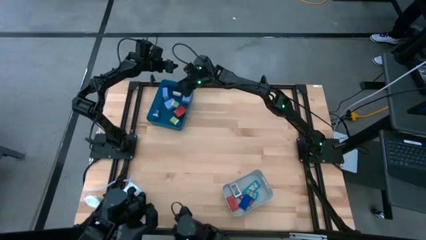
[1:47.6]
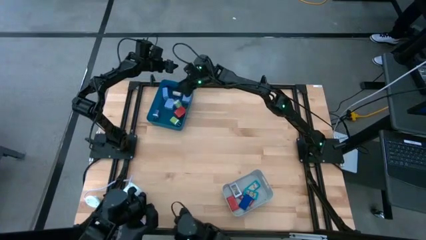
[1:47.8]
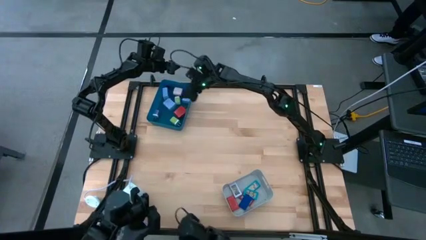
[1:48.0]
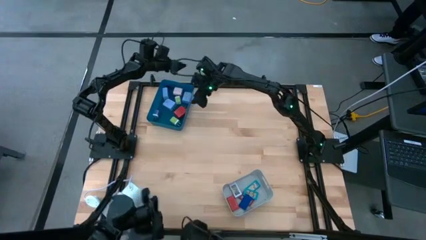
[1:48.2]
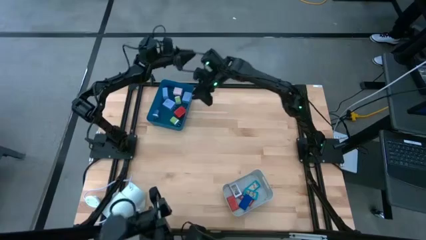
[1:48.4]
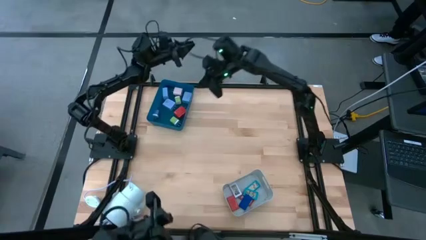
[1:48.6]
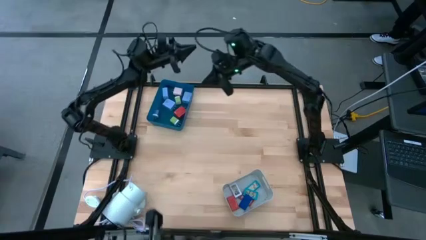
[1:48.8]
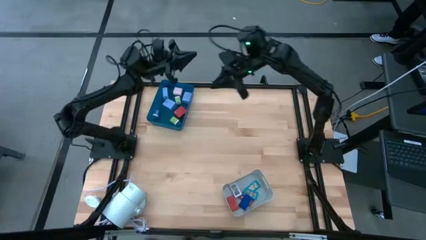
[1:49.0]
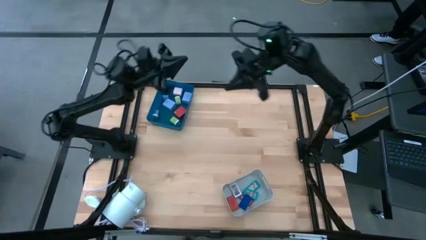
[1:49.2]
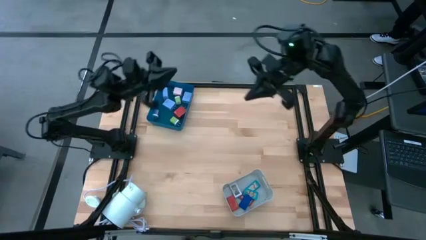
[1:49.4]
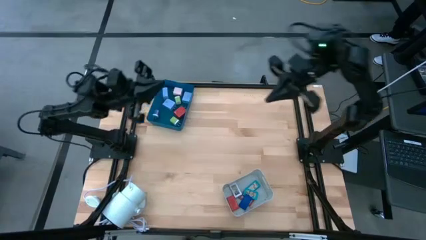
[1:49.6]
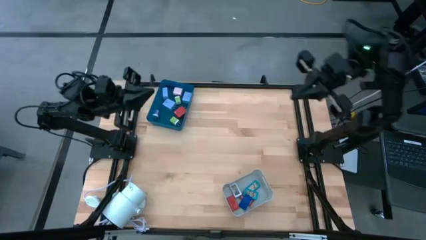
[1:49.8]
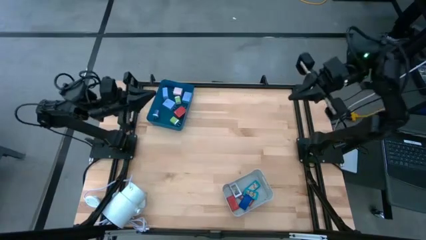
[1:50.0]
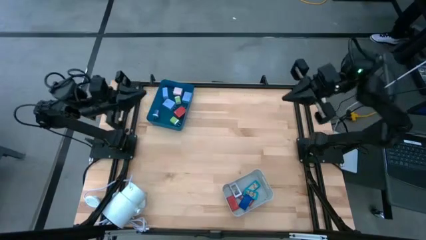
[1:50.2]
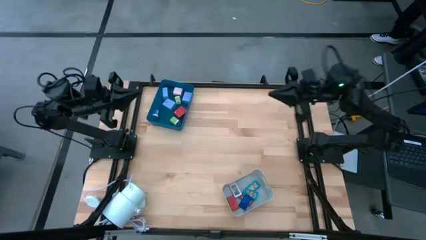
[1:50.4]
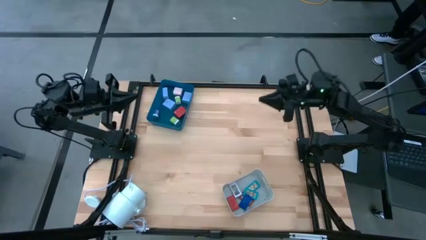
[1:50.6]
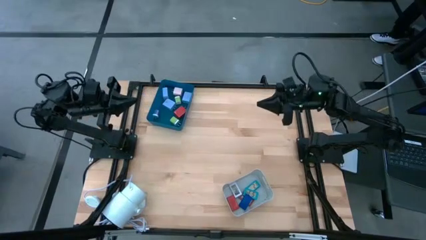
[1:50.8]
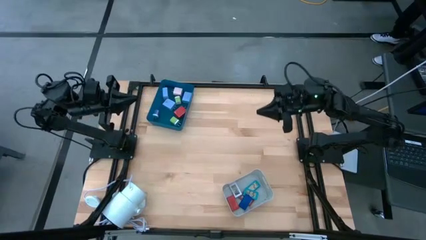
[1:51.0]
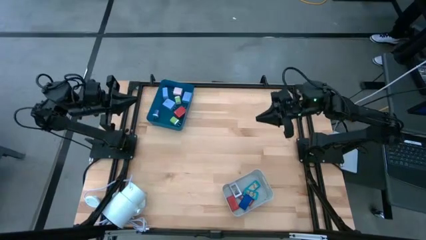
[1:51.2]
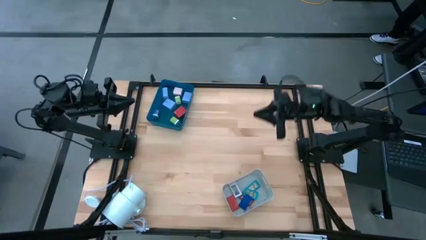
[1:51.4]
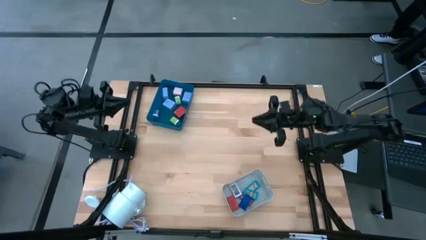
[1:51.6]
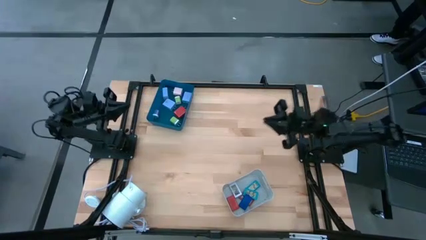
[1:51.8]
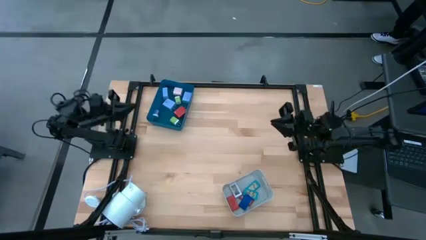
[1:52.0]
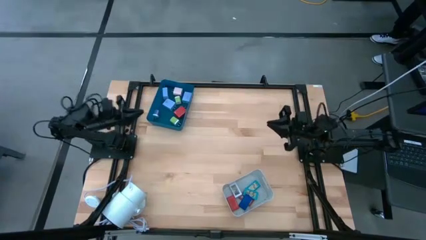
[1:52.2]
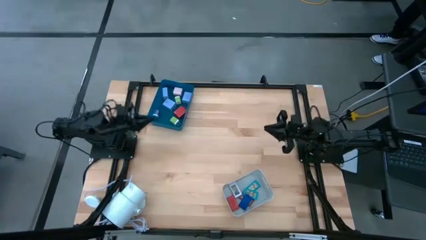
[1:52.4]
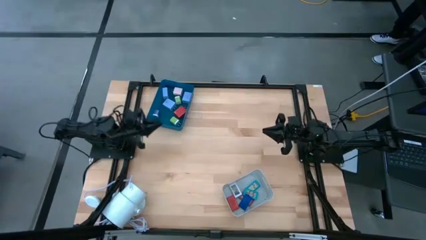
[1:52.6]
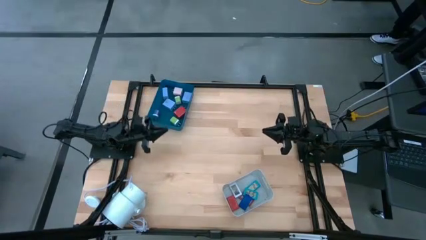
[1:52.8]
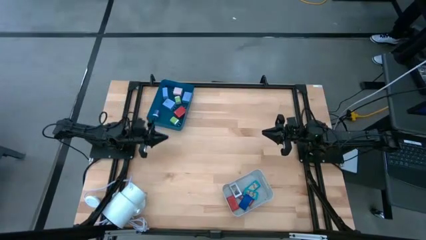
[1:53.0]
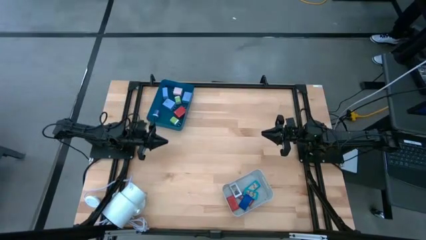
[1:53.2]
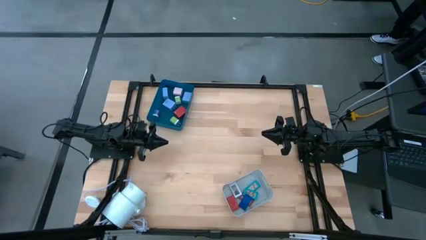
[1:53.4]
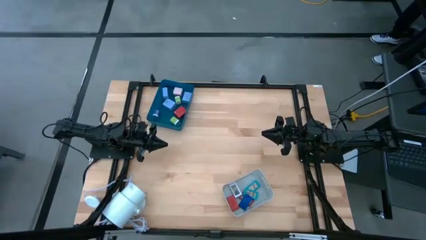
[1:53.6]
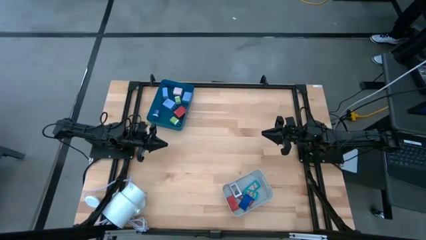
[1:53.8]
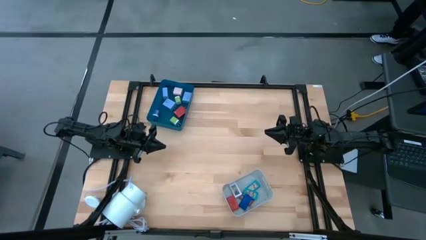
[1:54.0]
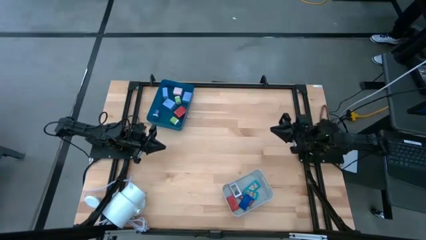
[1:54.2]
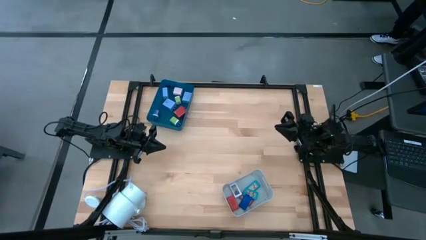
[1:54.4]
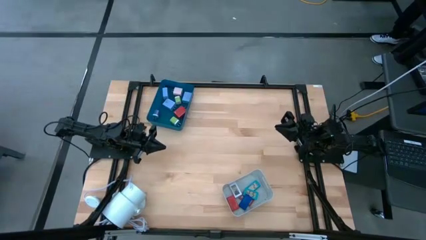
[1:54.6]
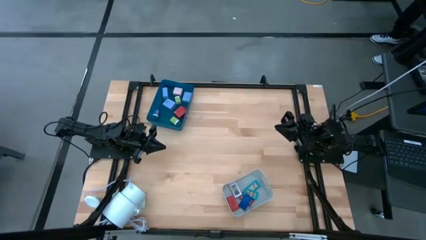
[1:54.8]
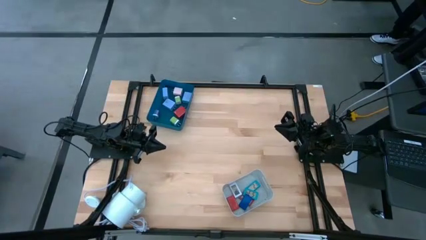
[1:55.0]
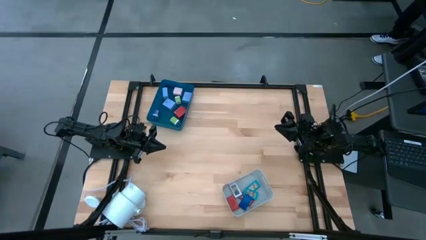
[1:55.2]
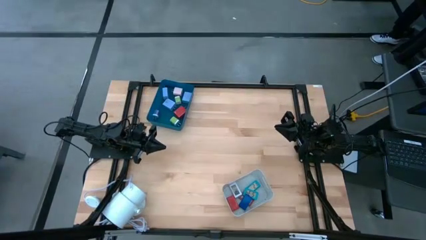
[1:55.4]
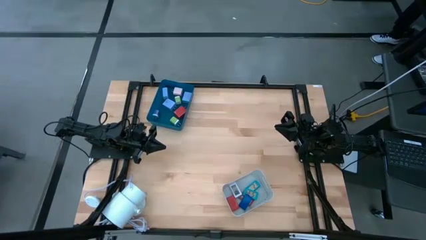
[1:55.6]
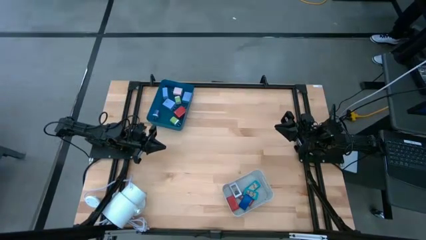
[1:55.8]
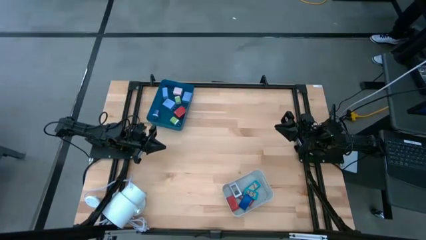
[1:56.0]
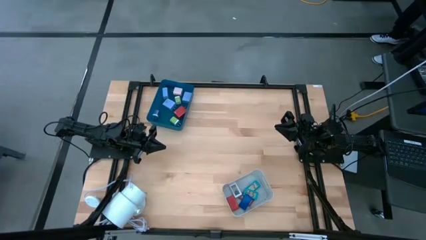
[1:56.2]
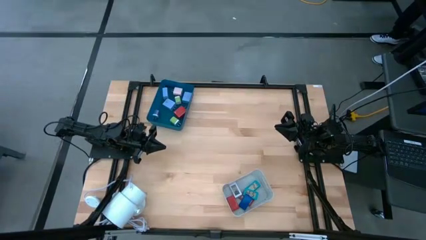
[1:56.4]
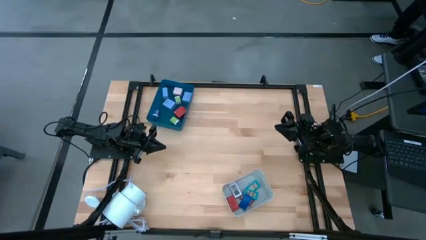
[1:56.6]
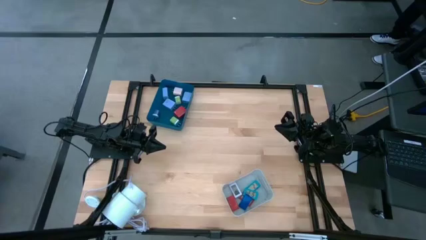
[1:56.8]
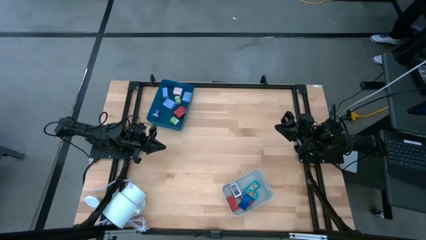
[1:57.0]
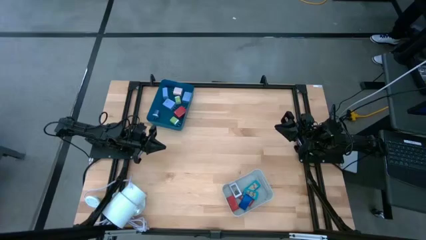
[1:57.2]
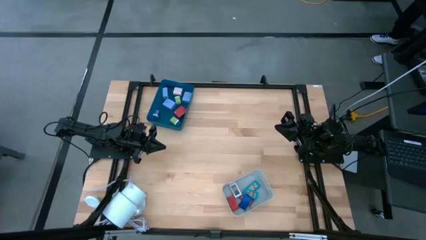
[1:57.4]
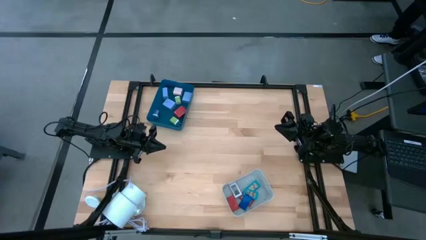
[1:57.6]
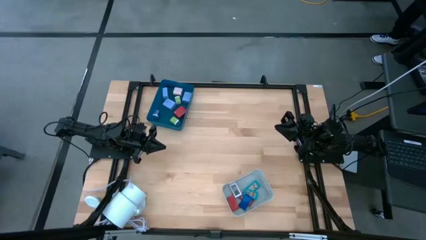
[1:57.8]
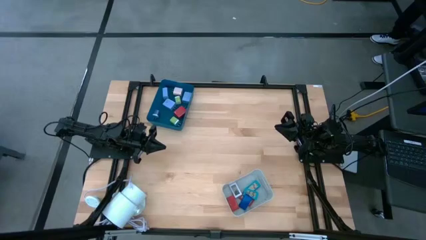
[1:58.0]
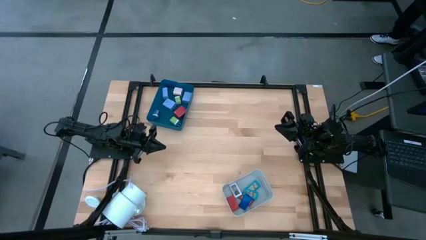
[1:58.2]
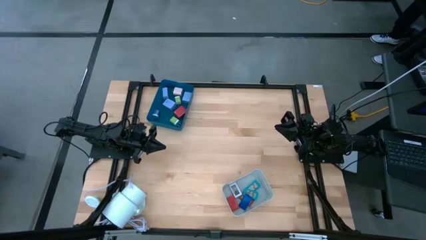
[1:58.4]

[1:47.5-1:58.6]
Task: Pick & Place Office items
Return to Home Position

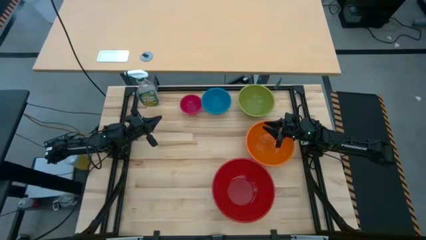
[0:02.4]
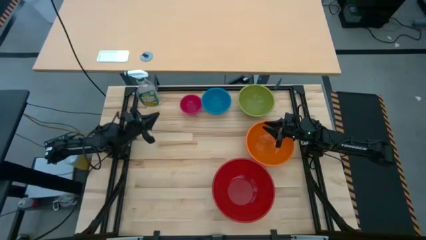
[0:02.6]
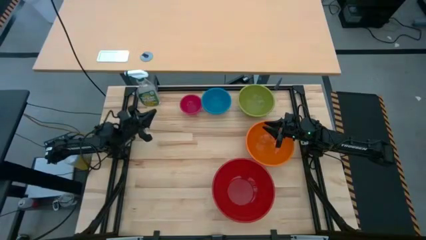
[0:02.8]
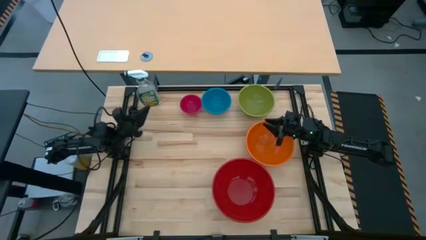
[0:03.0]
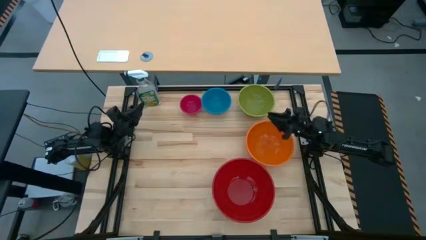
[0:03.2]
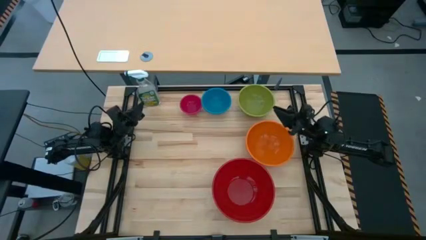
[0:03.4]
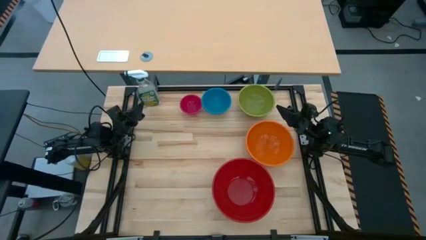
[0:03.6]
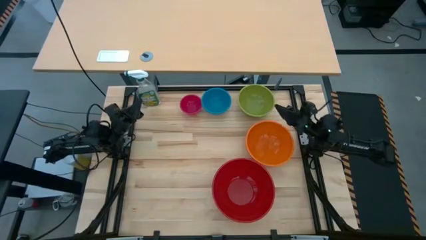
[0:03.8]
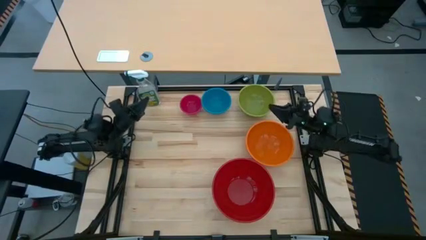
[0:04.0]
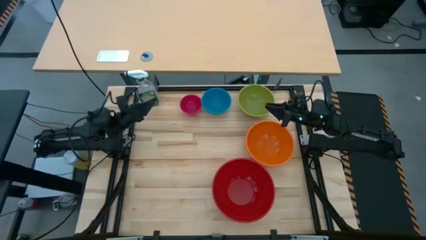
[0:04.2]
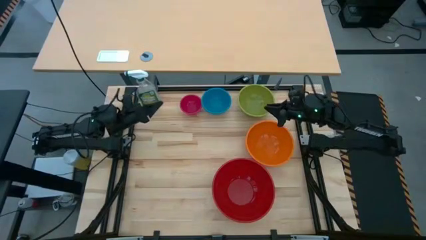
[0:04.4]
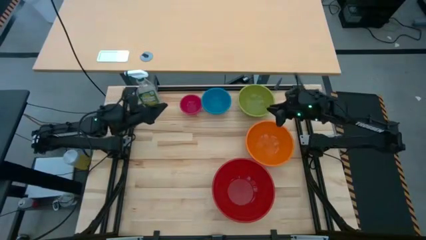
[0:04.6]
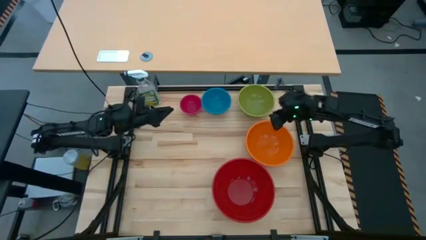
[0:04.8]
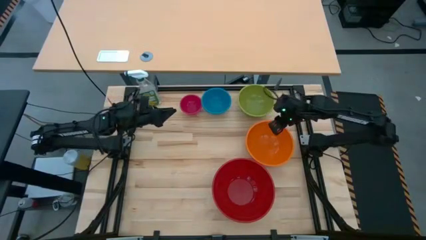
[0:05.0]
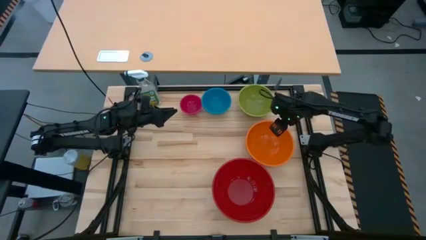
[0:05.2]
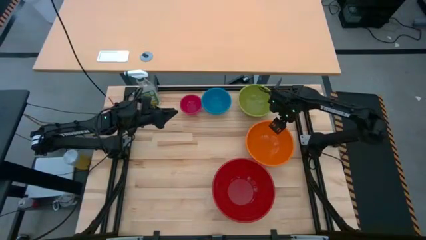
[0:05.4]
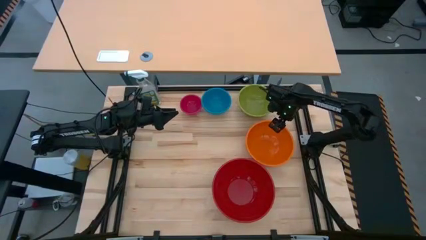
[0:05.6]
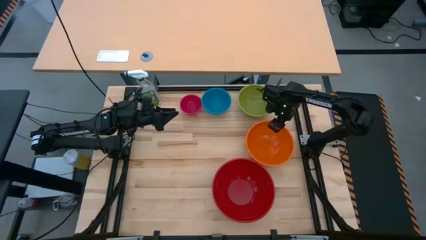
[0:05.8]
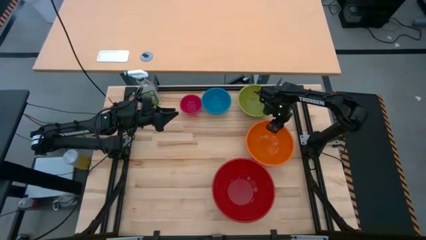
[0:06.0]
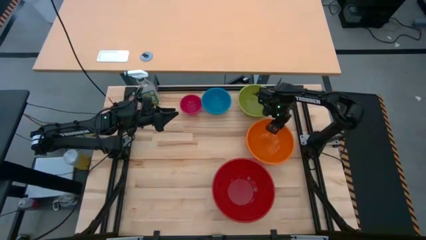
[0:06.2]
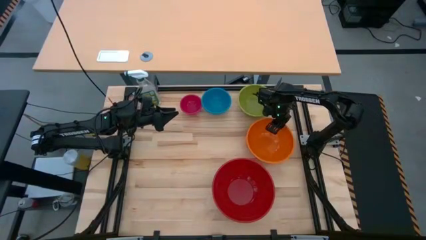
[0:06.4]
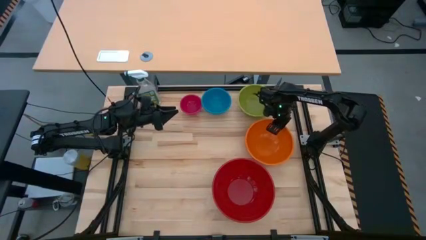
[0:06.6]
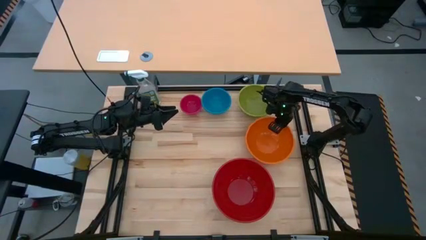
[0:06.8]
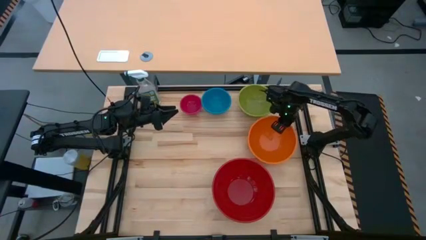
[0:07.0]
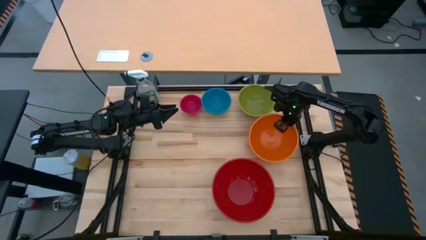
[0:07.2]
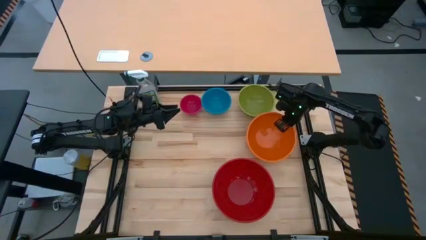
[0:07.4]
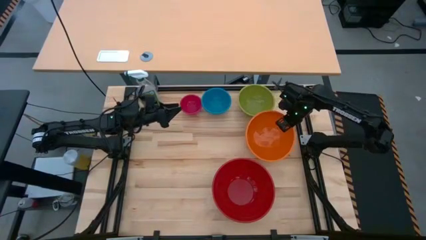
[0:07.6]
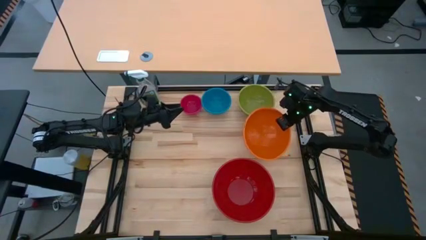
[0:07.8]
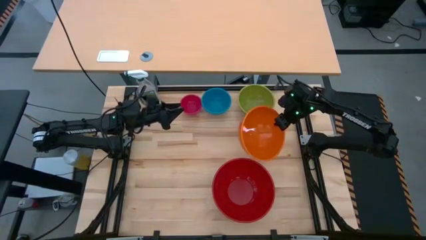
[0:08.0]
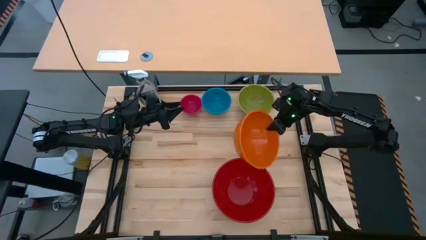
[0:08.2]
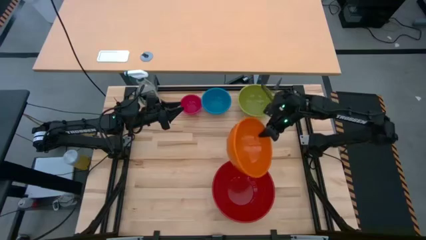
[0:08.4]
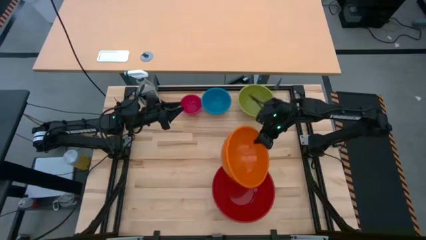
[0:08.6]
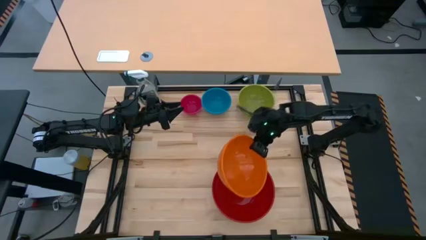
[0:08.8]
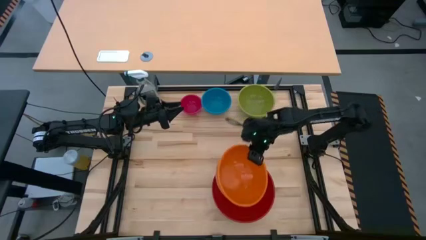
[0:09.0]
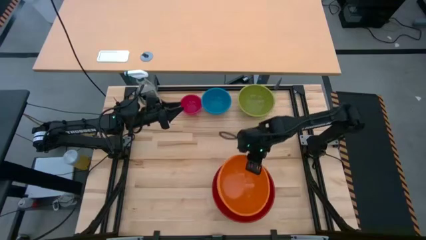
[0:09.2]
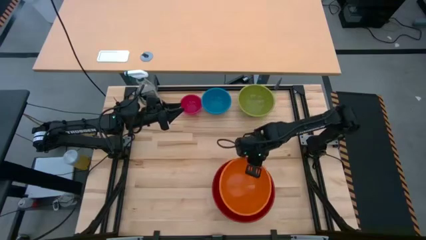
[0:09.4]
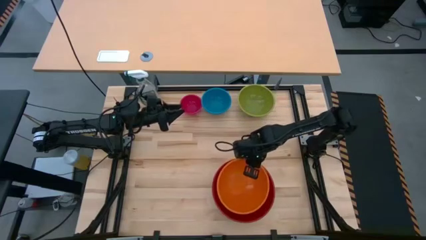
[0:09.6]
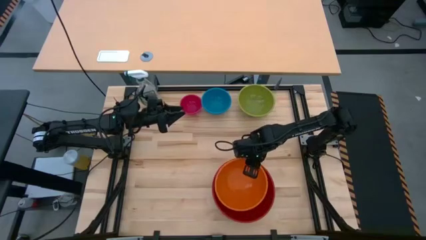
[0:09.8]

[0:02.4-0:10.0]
Task: Nest bowls inside each other by size order
Stack the orange bowl into the red bowl
